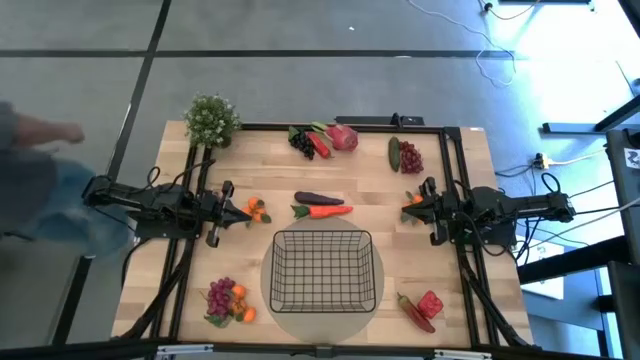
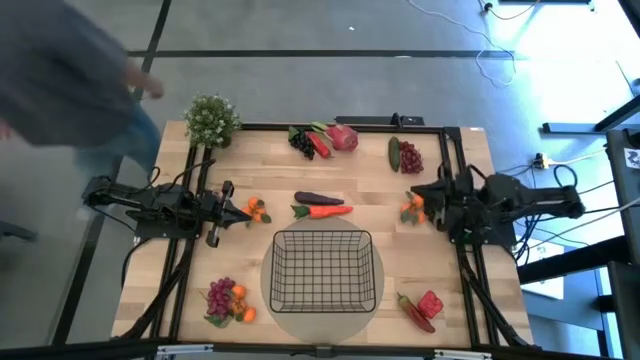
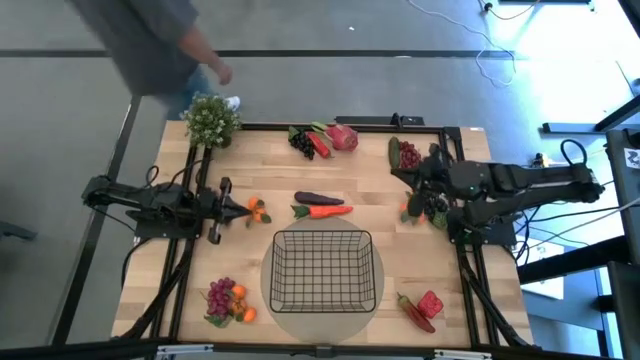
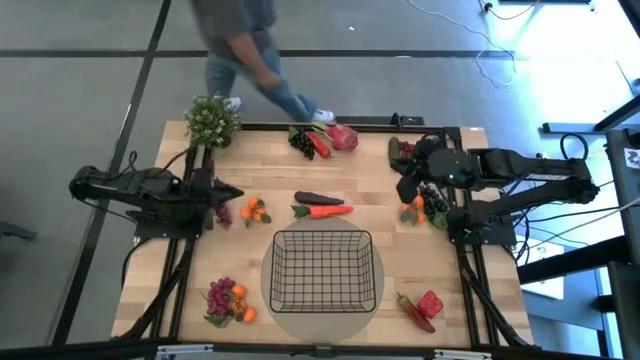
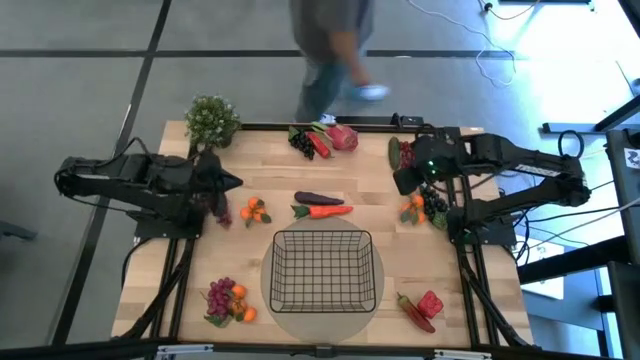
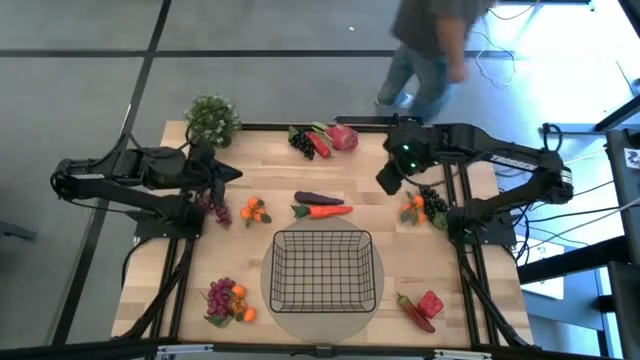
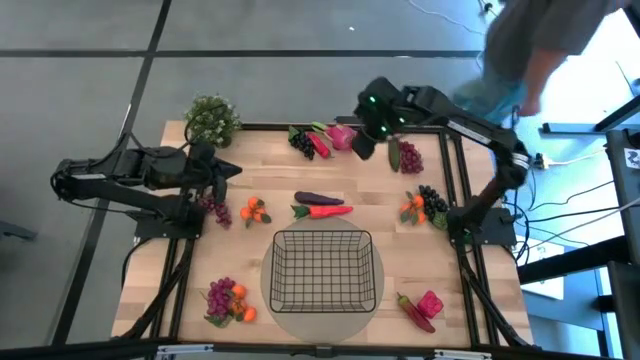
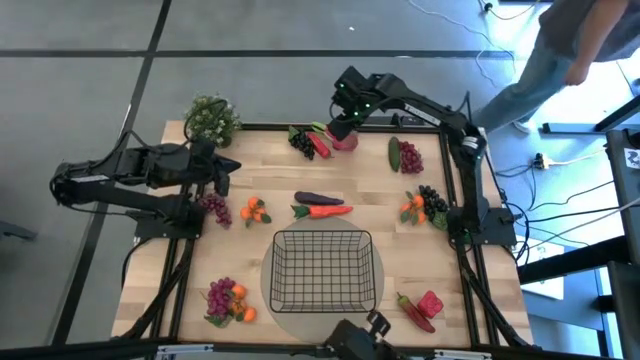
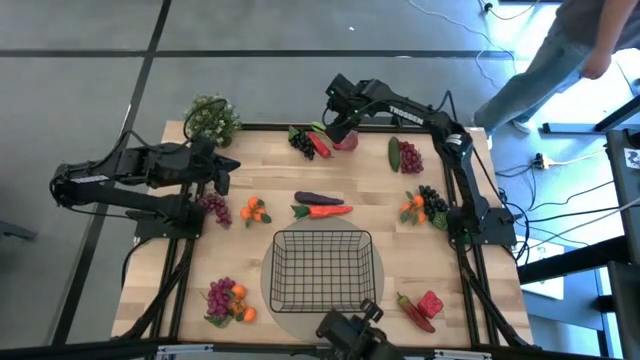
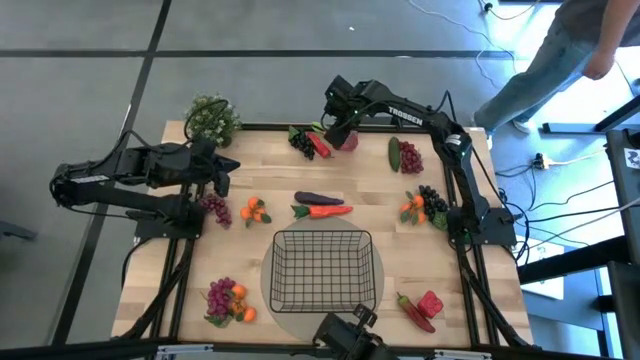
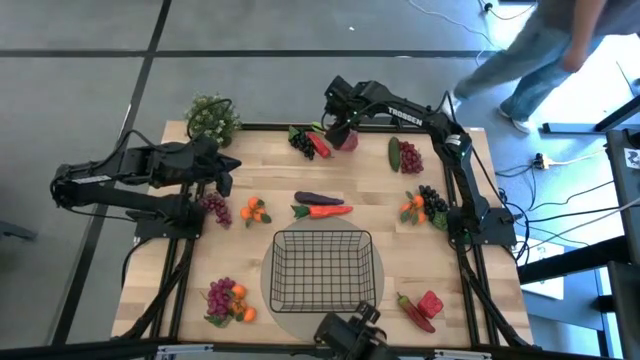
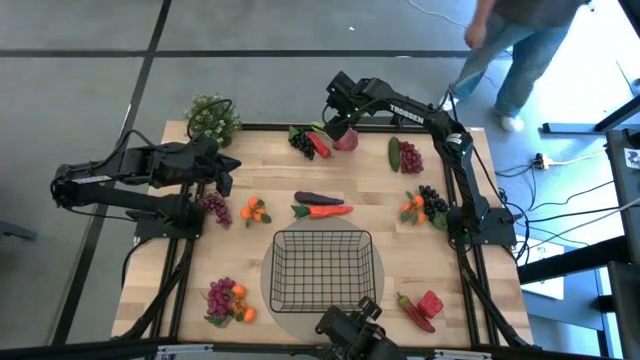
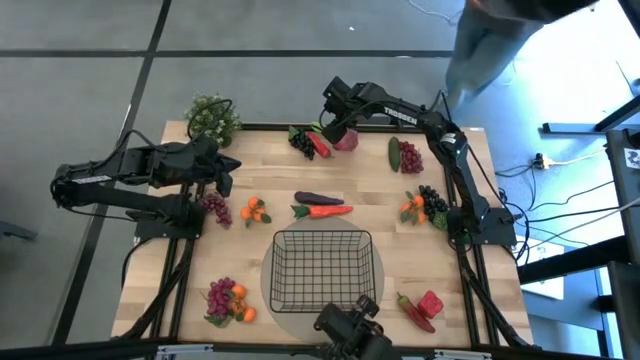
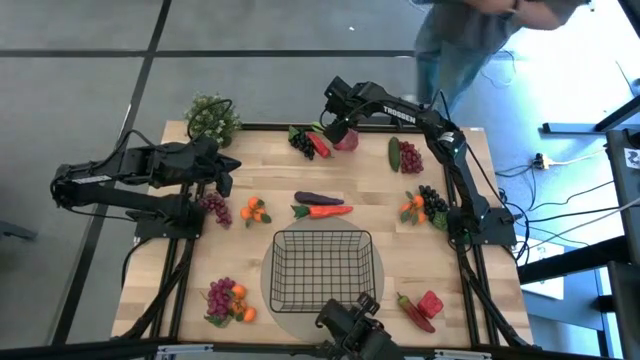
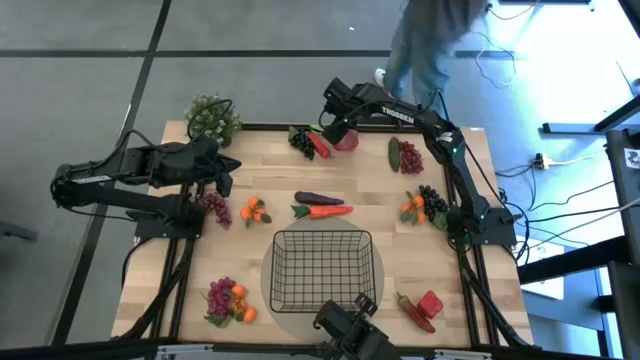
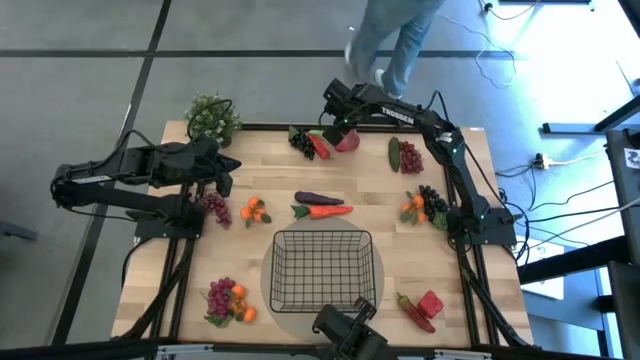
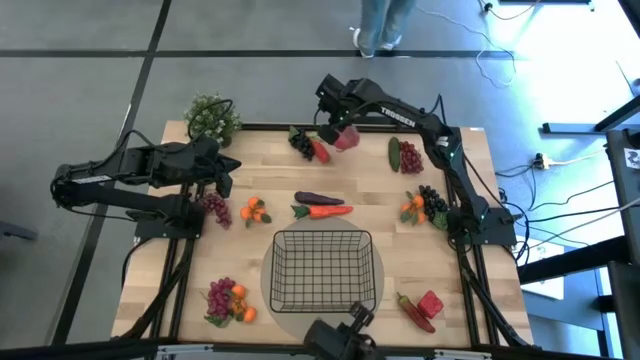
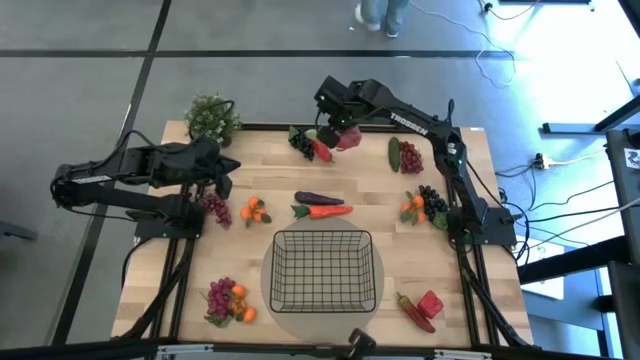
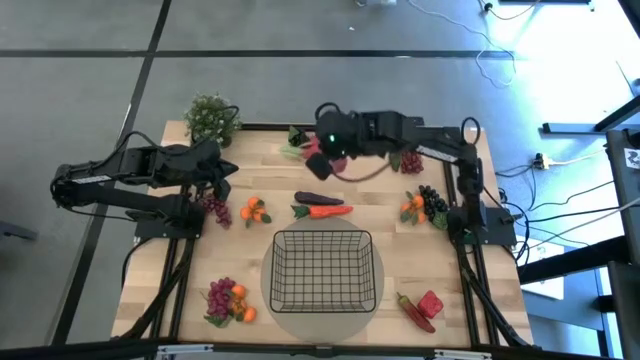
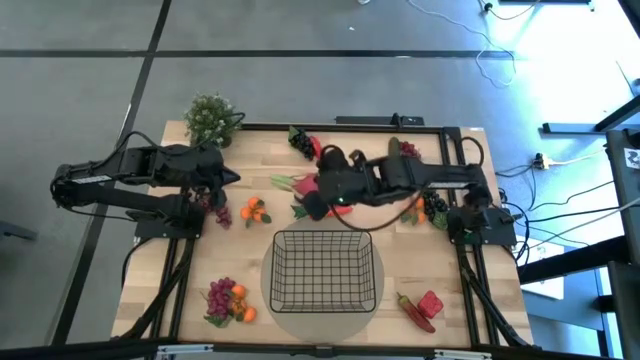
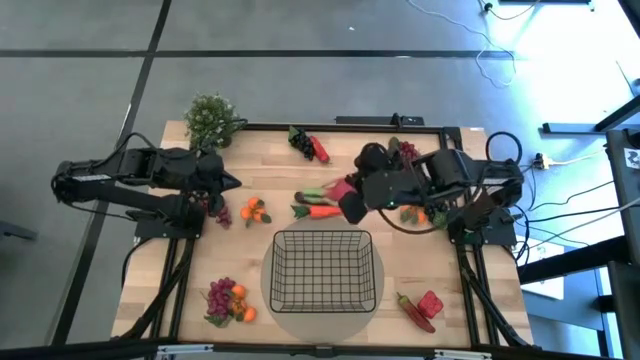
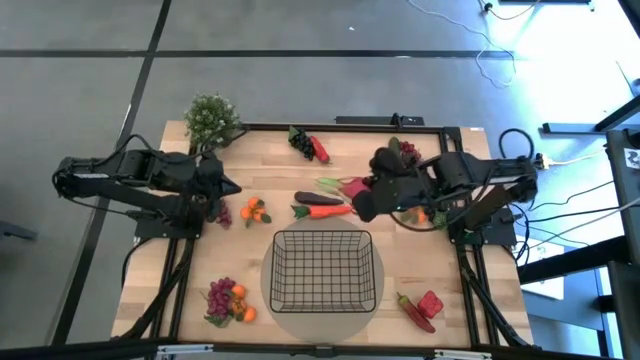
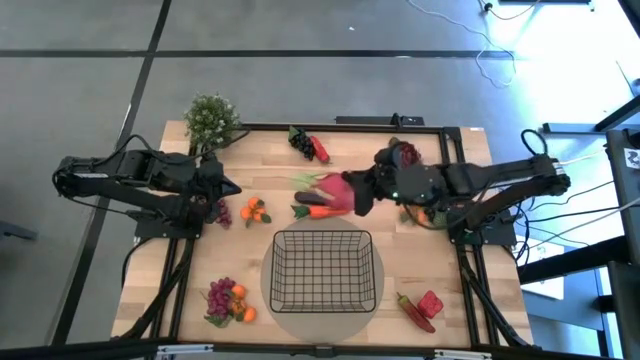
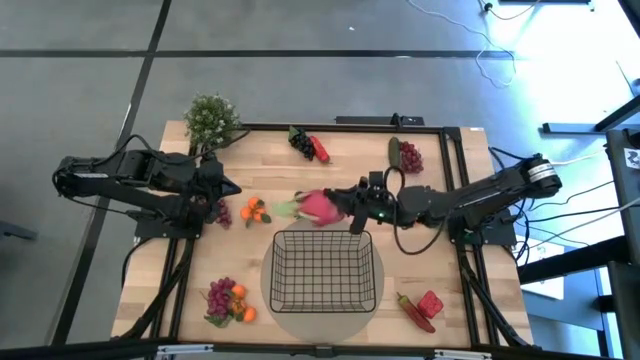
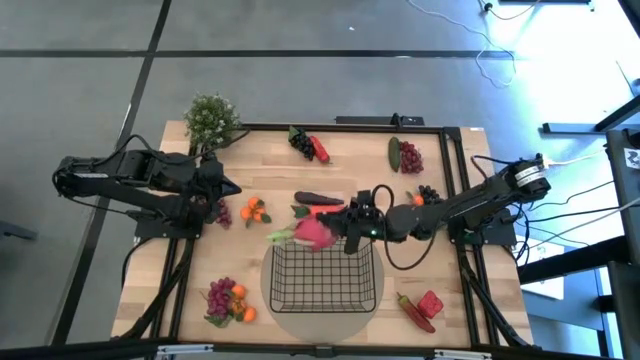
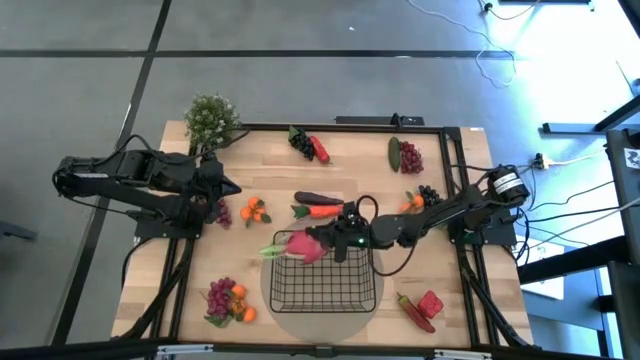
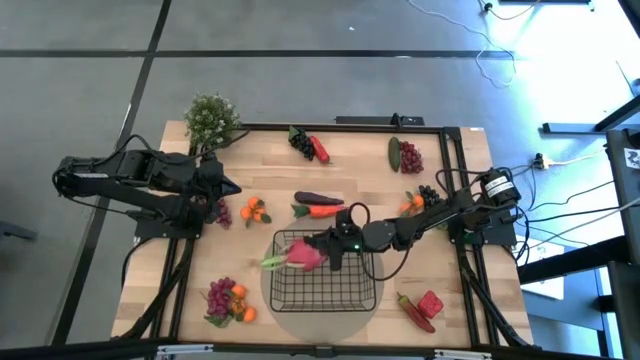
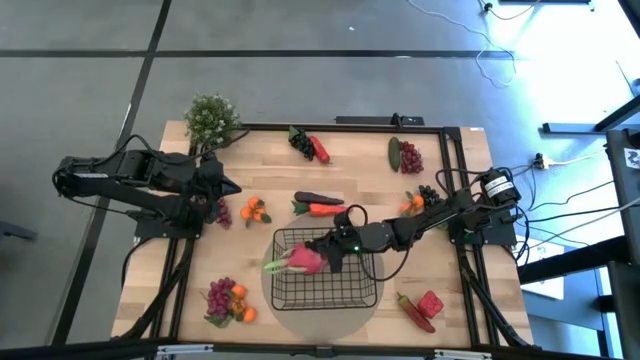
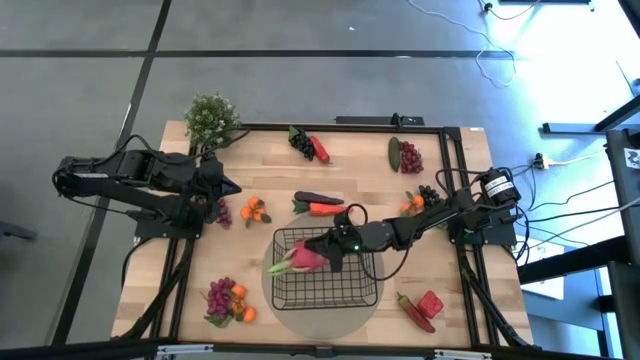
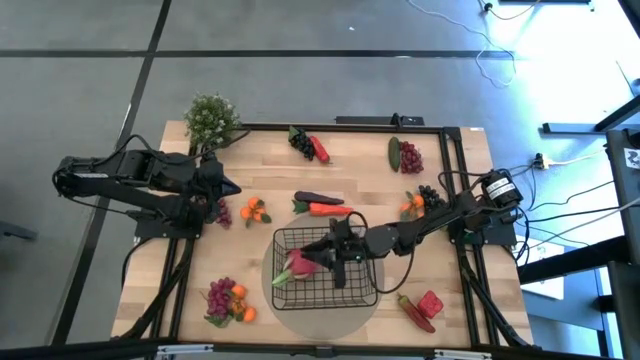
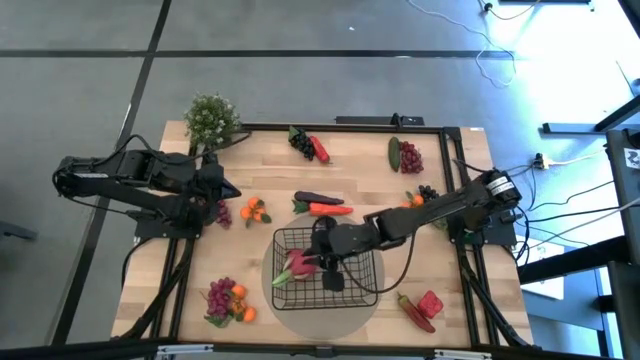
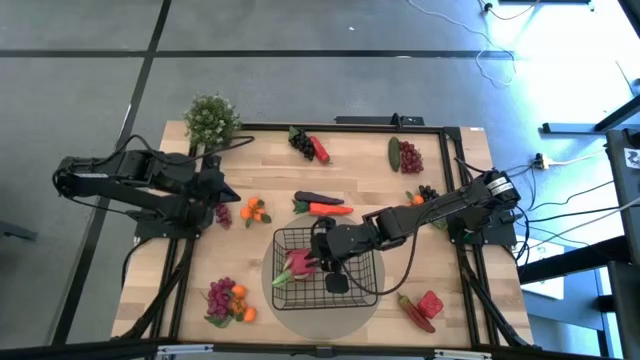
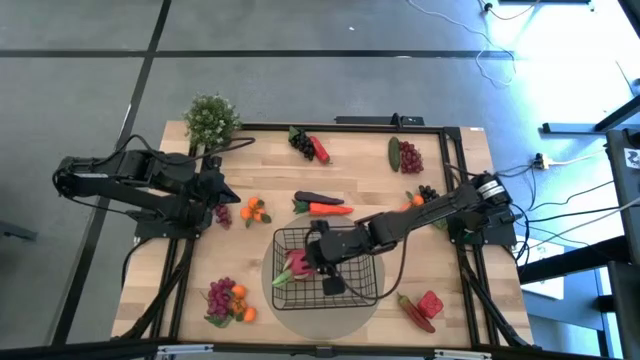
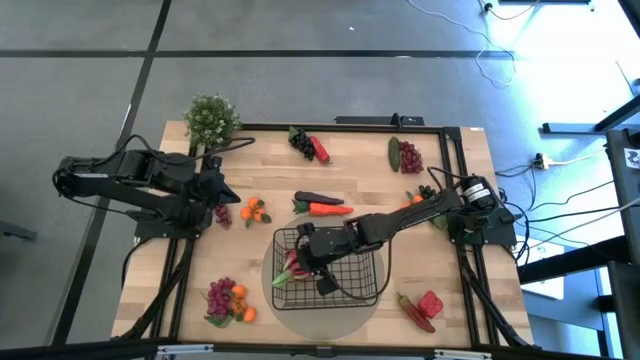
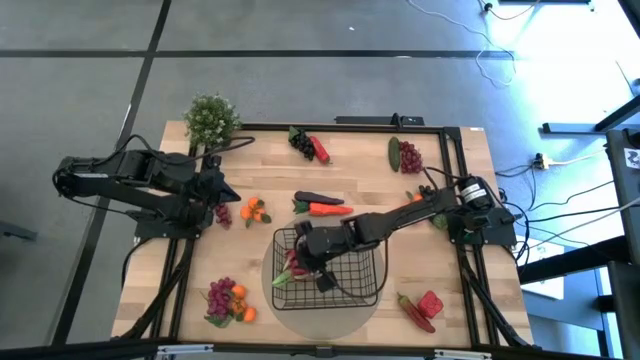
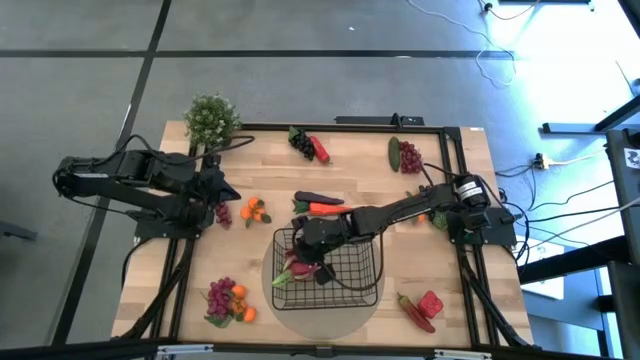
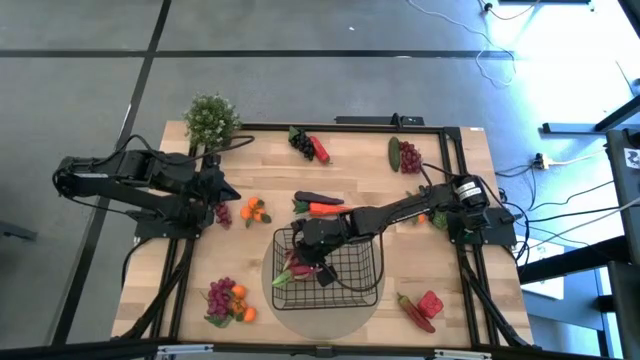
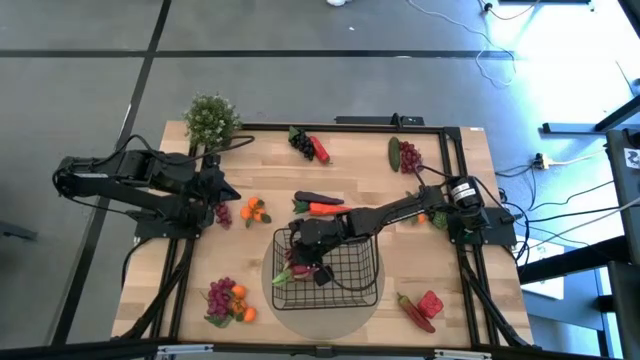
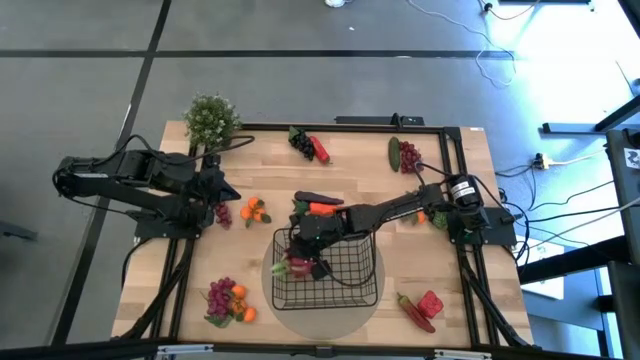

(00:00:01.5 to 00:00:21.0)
Task: Build produce basket
Put the dragon fruit into the black wire basket
